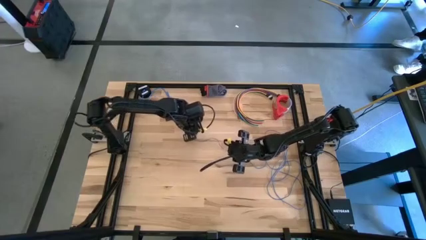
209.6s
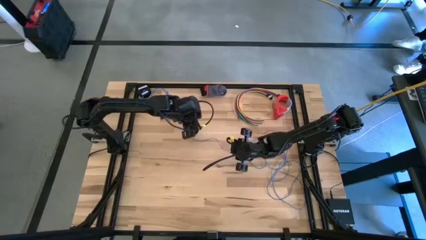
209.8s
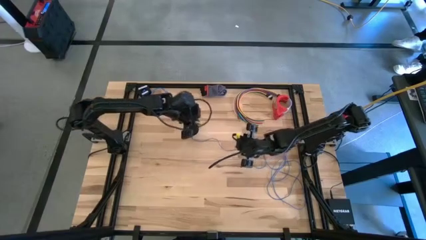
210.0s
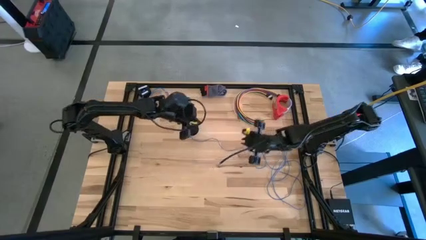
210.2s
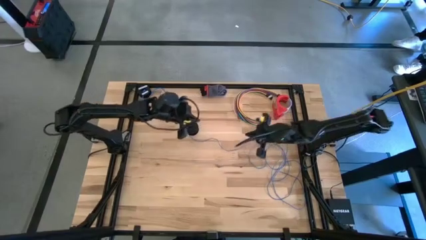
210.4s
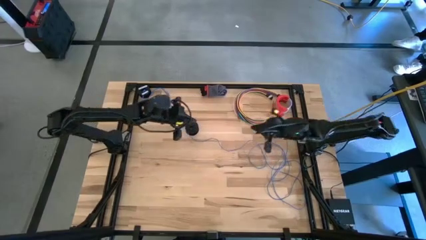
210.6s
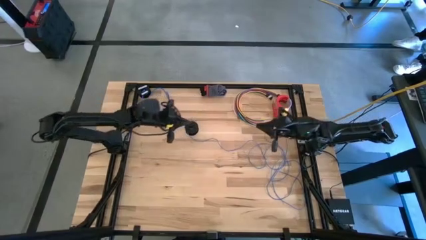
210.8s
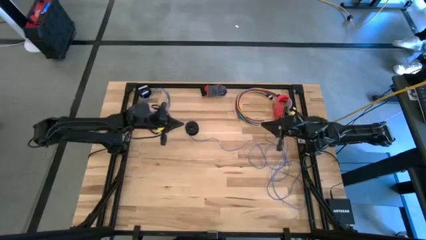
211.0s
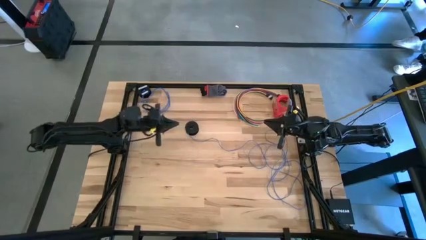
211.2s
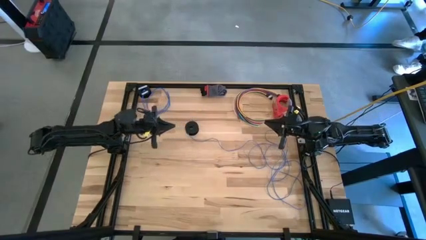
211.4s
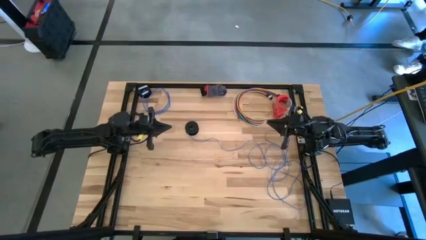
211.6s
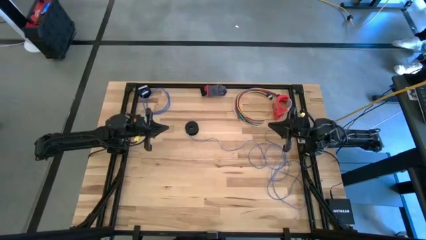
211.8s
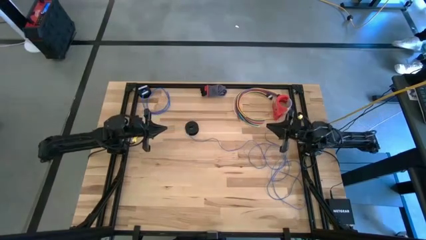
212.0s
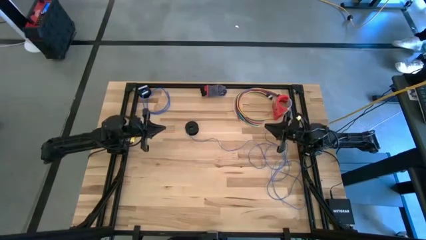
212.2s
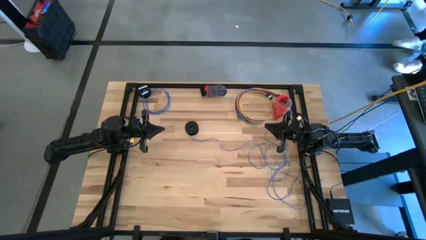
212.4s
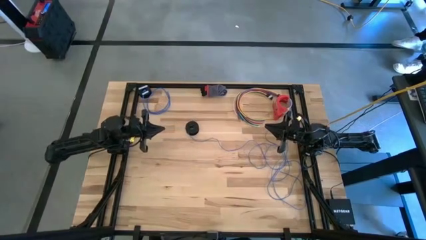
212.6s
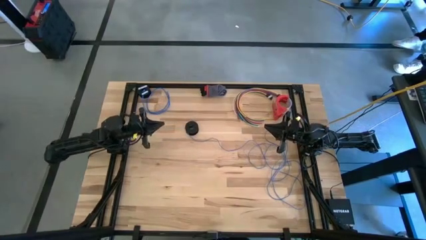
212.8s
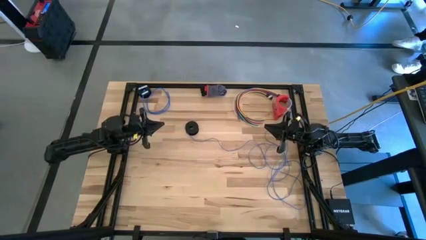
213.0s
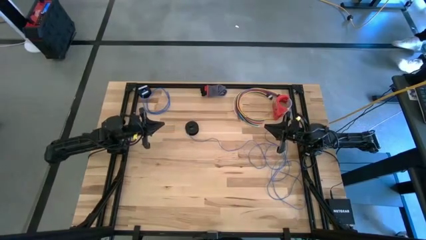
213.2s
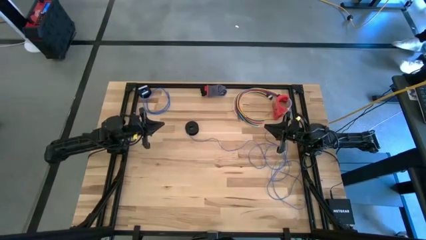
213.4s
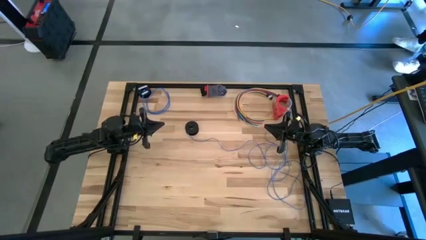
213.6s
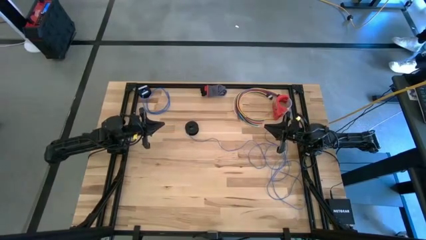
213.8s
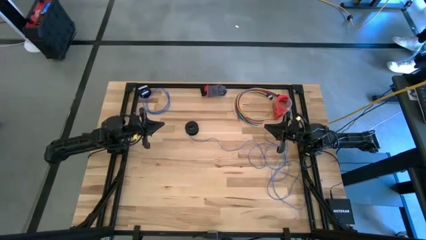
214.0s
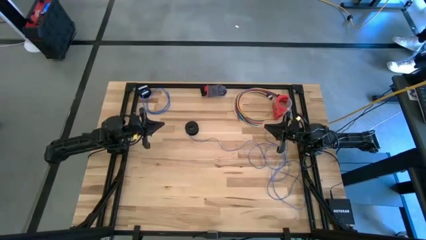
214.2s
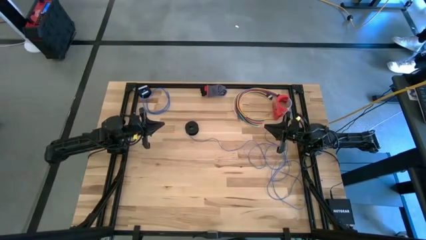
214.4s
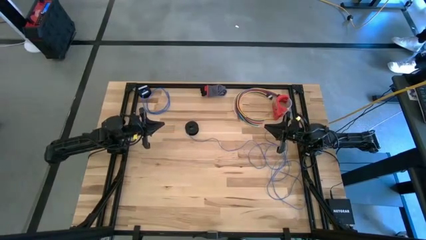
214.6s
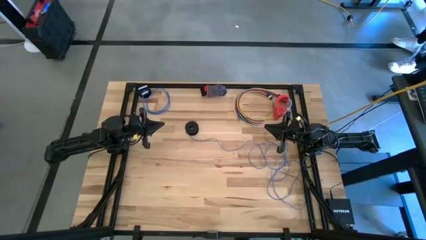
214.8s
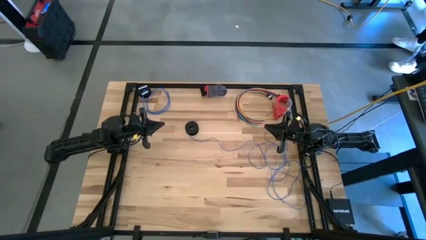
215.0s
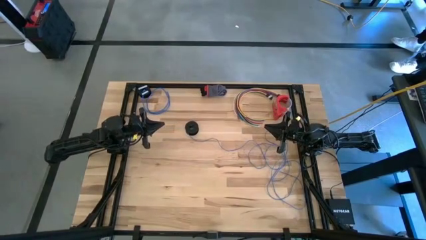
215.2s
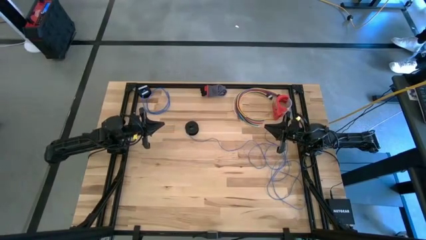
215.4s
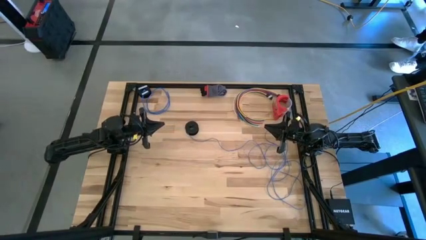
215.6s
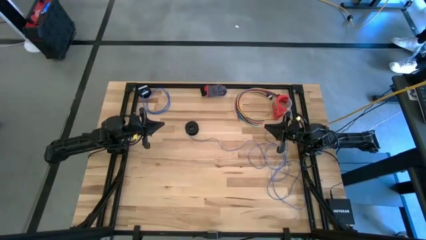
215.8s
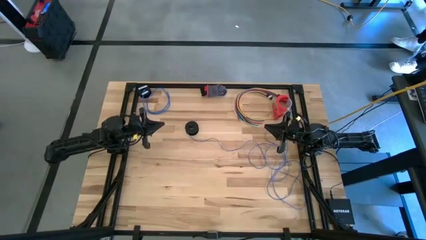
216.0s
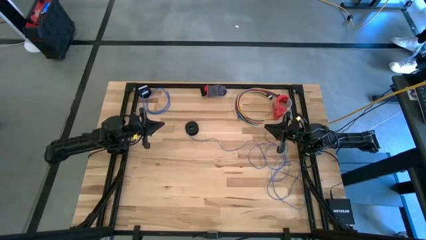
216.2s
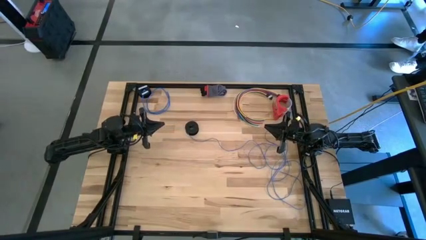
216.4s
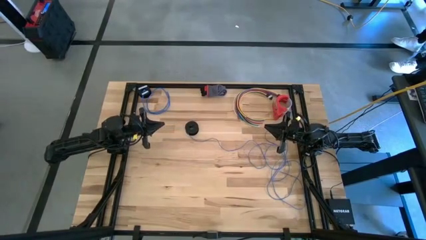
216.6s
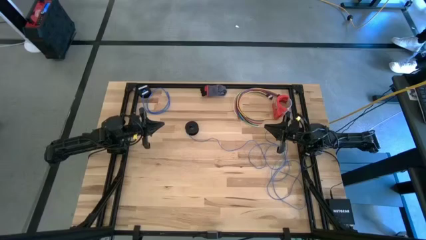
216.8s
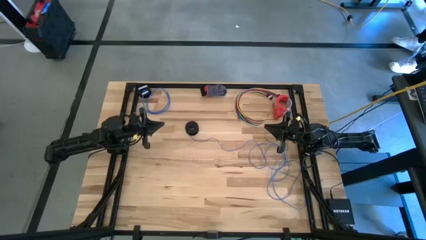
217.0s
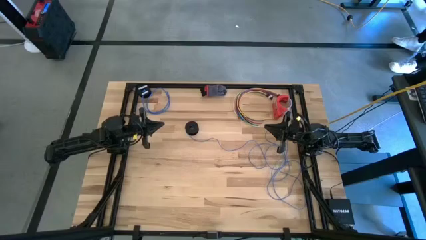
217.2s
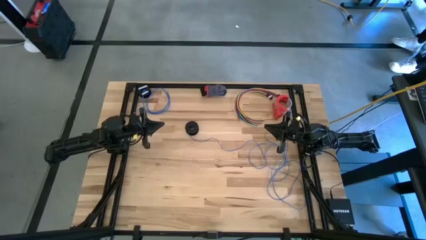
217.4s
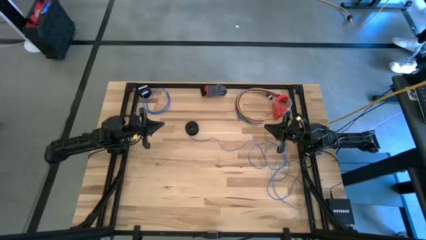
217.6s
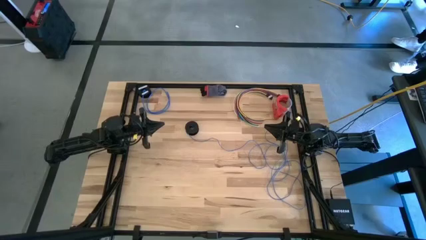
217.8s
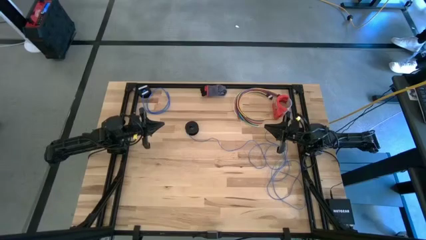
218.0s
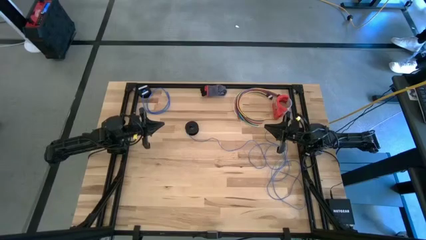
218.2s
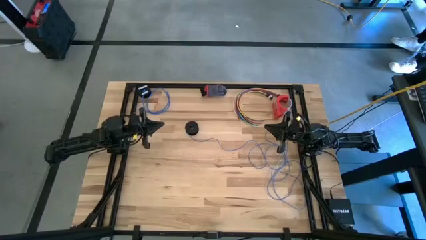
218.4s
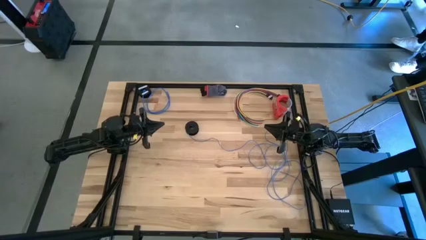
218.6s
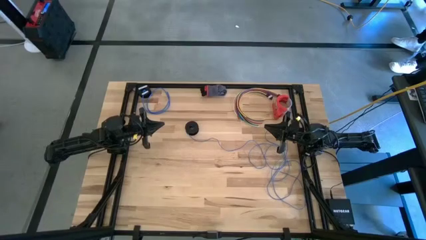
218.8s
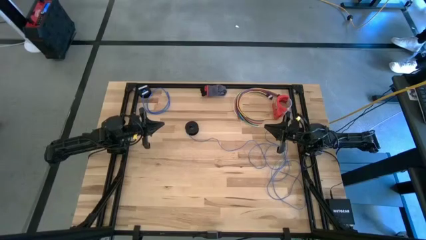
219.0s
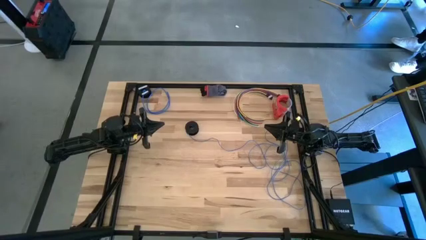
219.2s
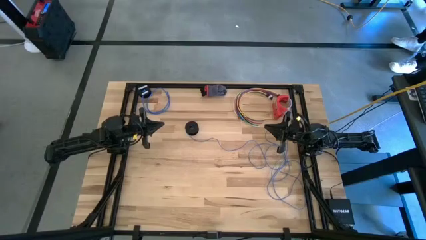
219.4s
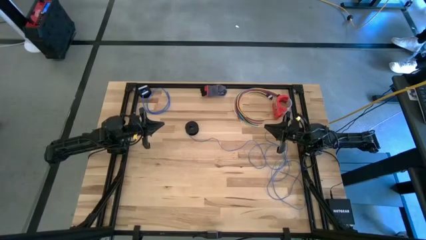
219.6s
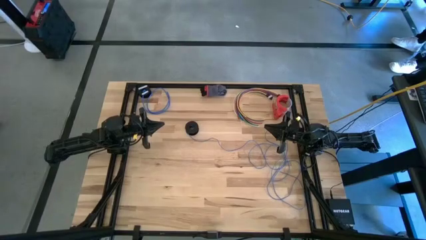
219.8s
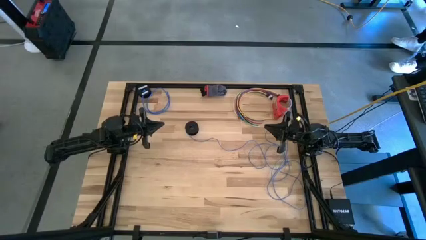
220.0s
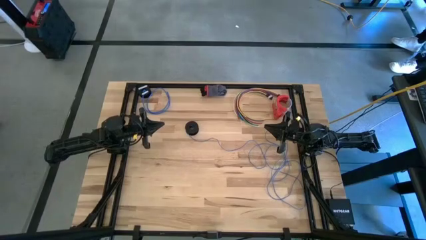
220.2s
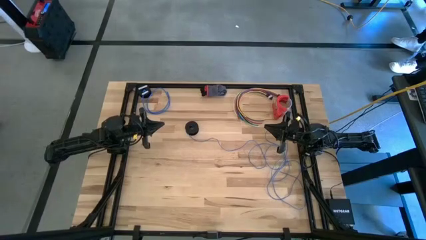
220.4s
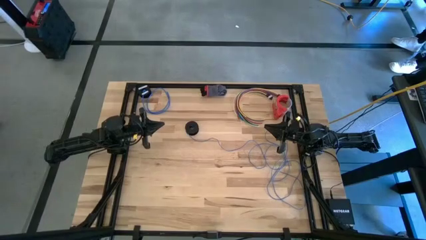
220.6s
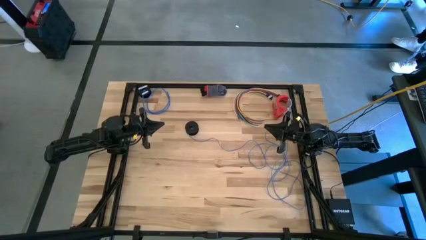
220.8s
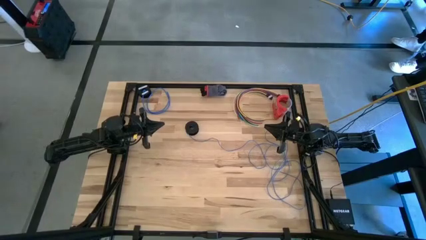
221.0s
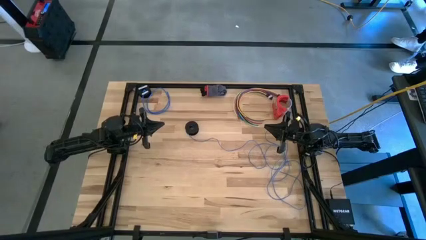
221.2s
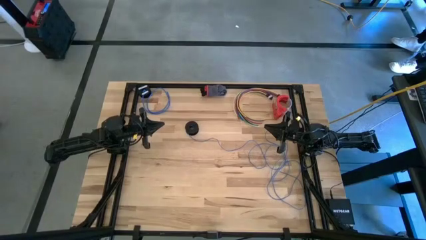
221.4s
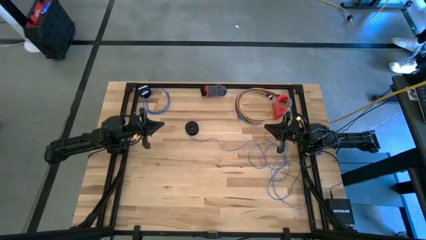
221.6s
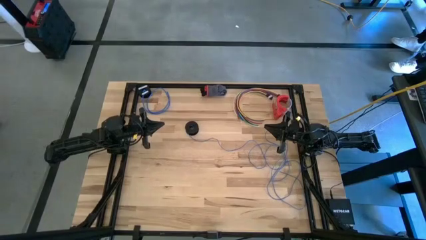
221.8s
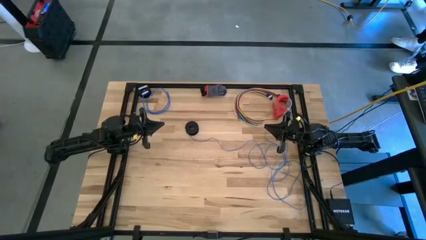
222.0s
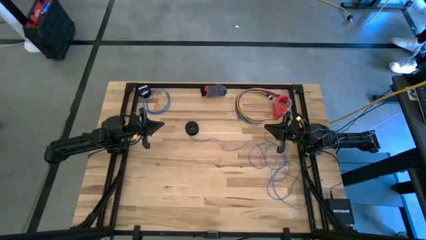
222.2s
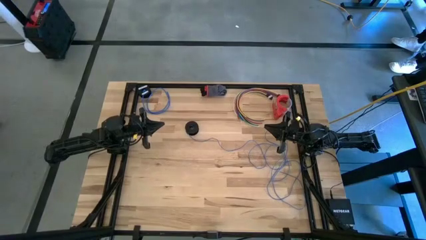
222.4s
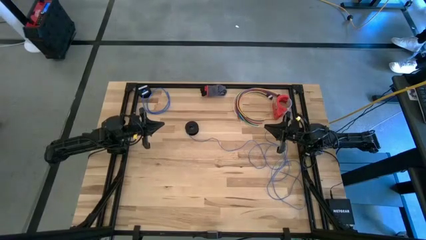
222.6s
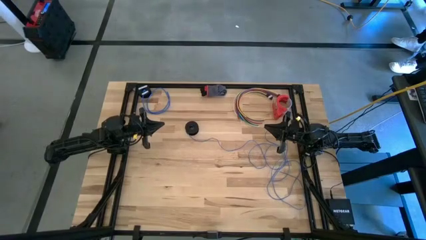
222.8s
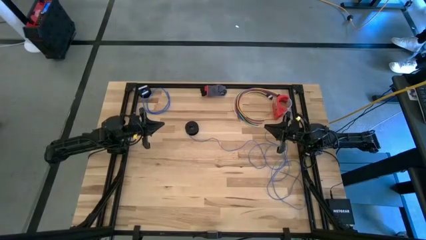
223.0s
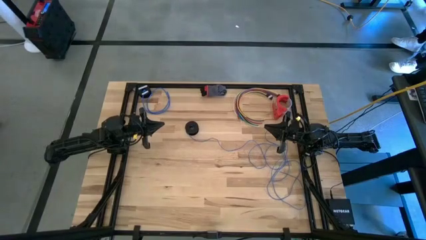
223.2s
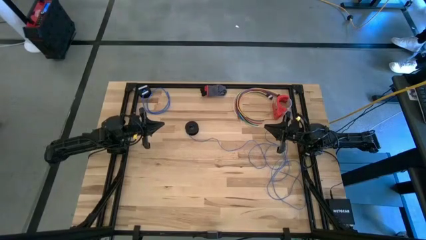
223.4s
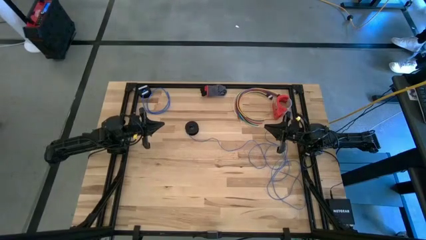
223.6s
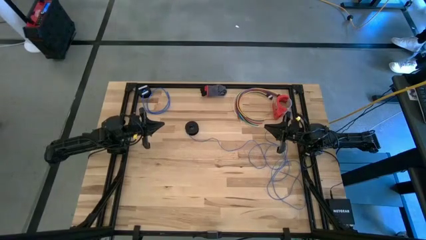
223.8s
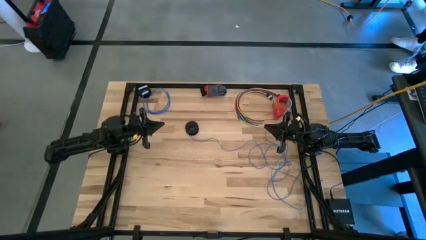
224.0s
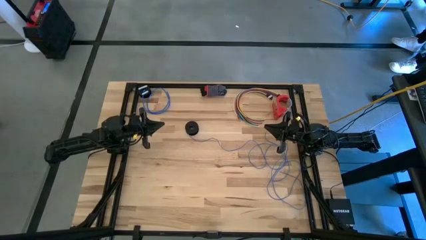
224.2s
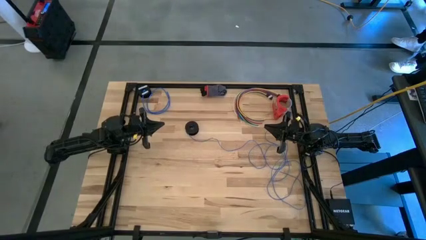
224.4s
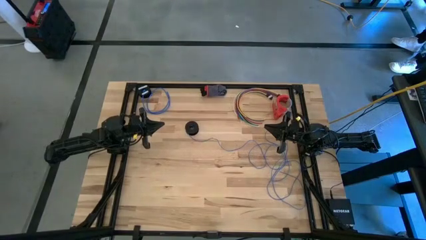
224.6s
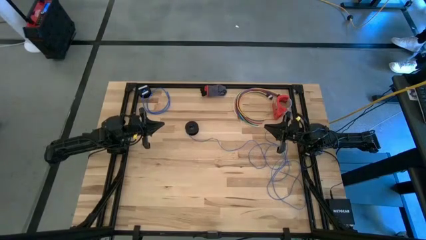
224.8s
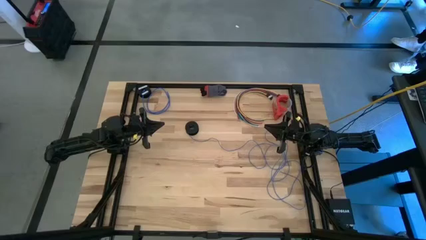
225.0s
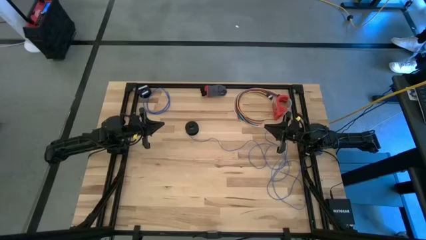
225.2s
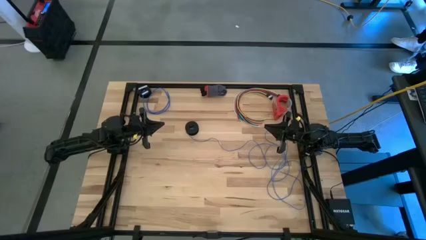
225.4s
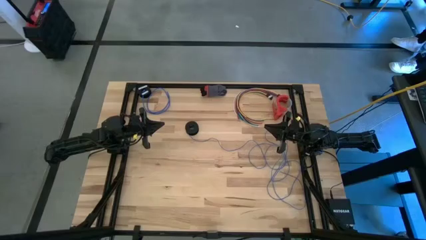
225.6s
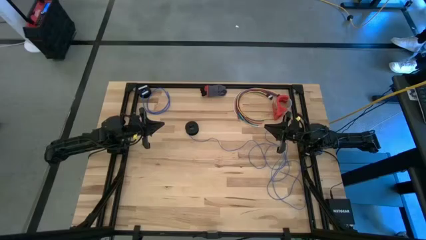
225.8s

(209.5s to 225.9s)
Task: Coil cords
Return to Home Position
